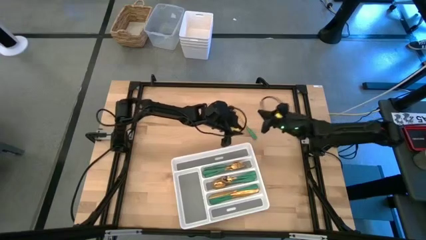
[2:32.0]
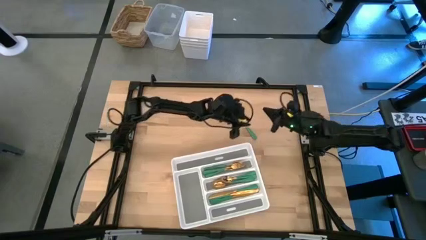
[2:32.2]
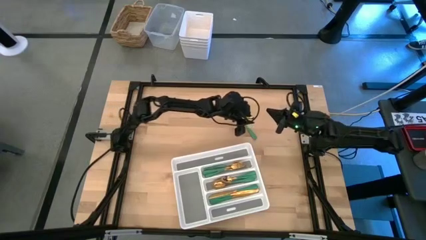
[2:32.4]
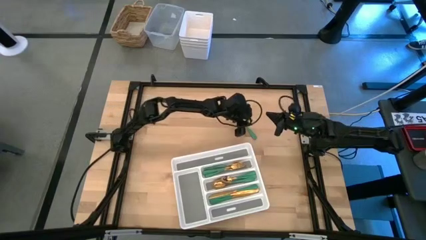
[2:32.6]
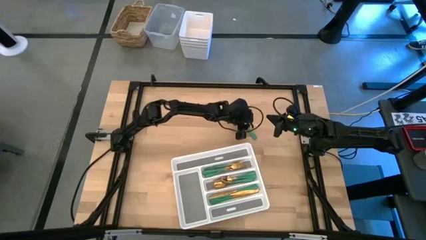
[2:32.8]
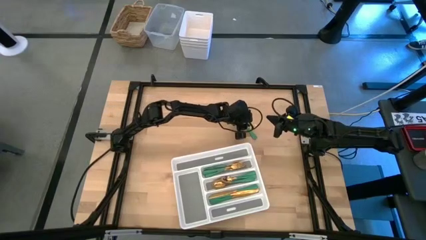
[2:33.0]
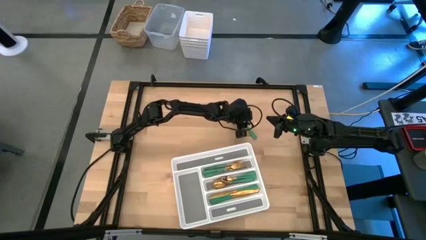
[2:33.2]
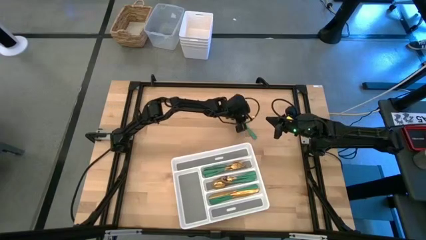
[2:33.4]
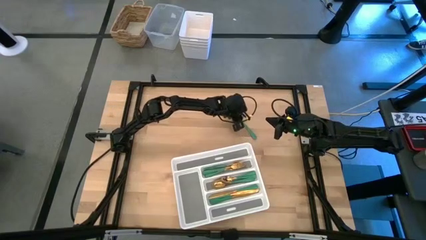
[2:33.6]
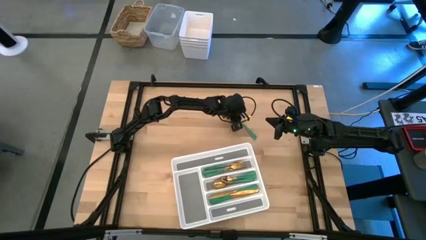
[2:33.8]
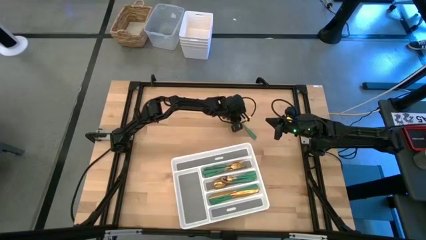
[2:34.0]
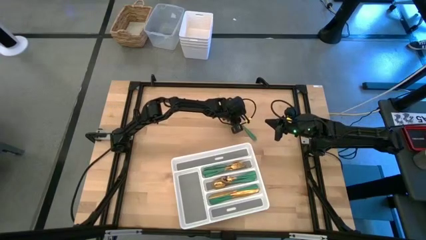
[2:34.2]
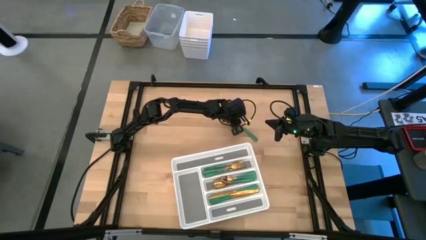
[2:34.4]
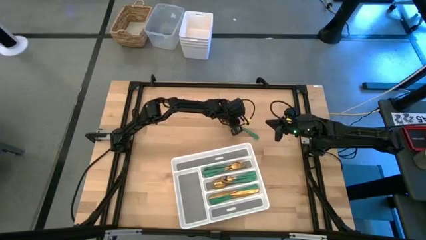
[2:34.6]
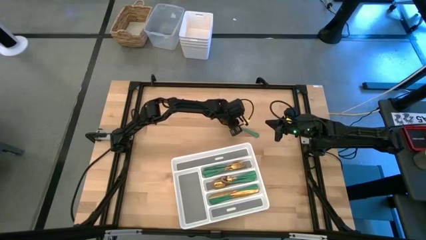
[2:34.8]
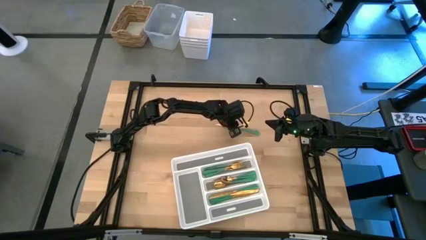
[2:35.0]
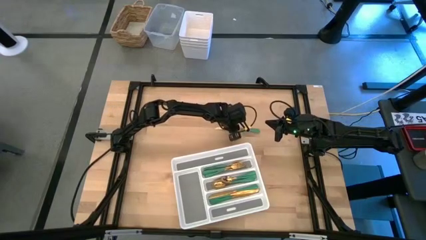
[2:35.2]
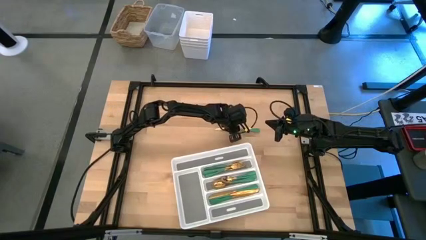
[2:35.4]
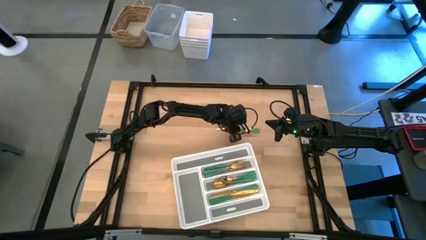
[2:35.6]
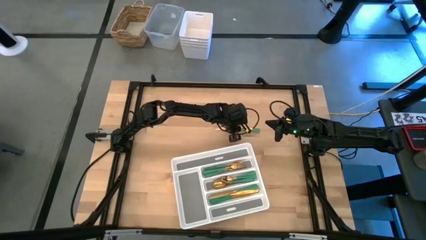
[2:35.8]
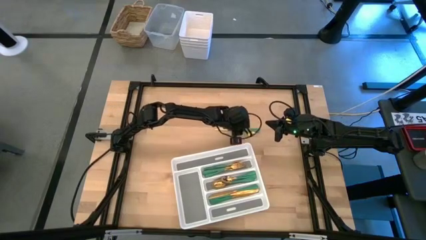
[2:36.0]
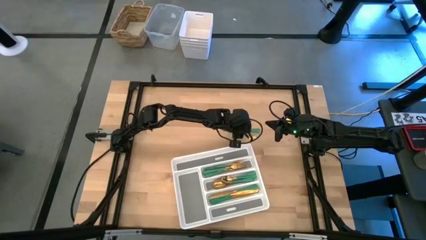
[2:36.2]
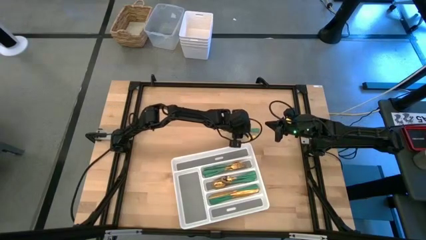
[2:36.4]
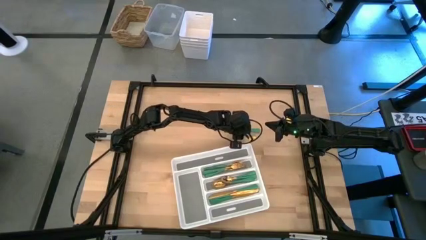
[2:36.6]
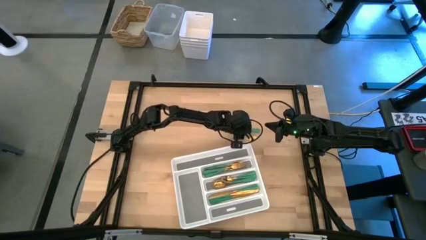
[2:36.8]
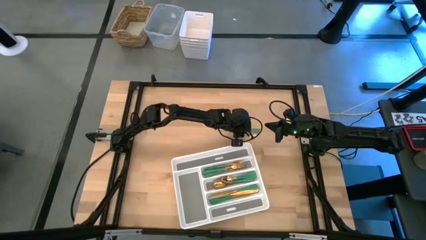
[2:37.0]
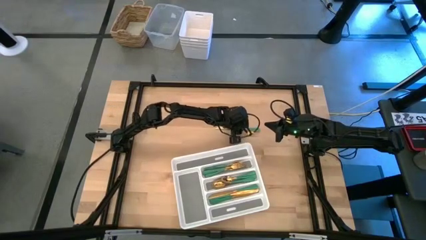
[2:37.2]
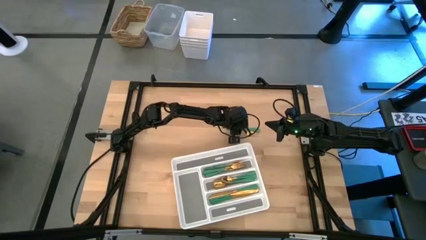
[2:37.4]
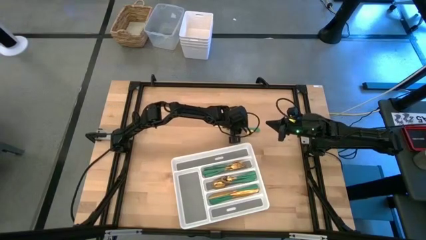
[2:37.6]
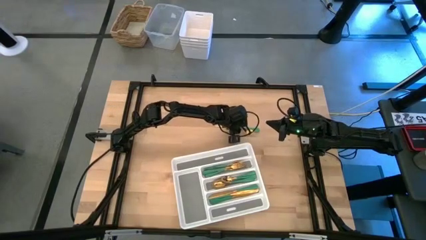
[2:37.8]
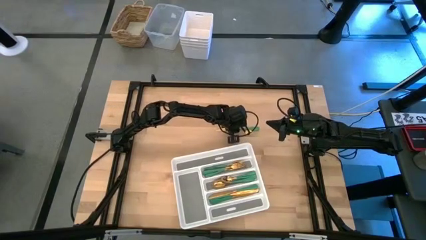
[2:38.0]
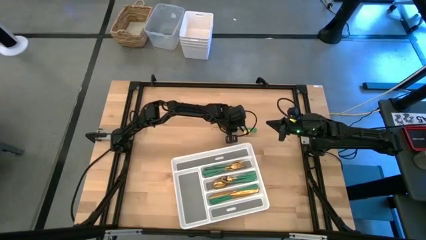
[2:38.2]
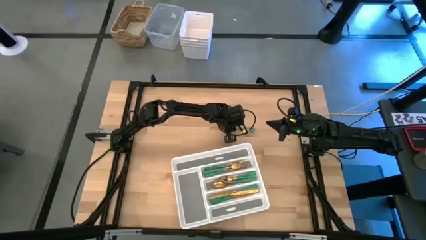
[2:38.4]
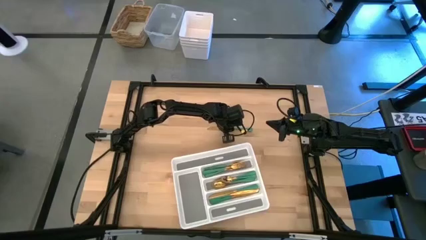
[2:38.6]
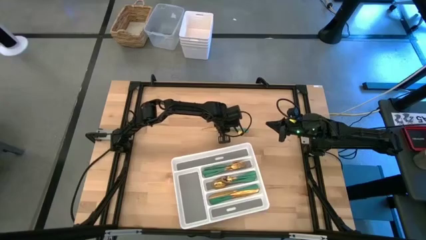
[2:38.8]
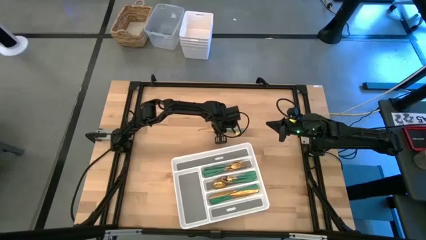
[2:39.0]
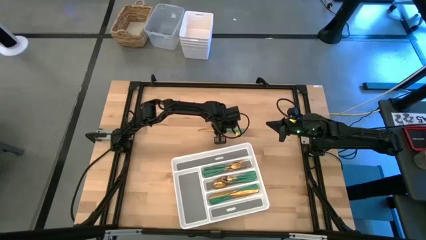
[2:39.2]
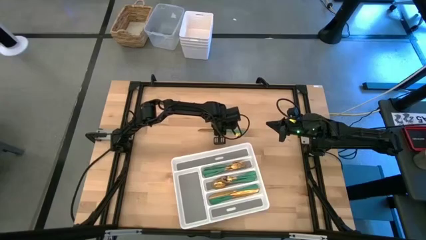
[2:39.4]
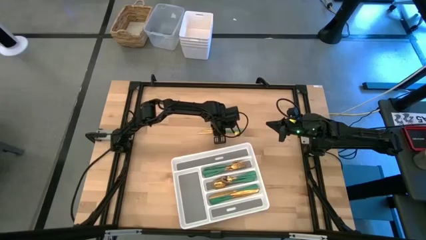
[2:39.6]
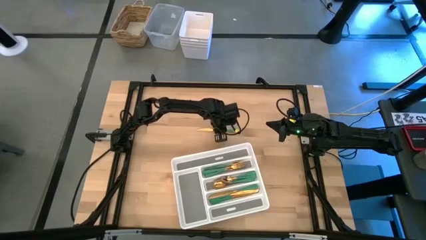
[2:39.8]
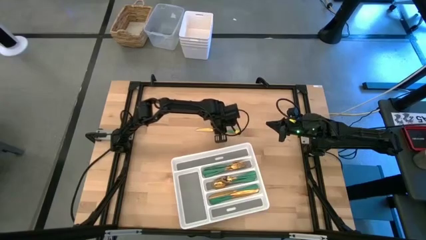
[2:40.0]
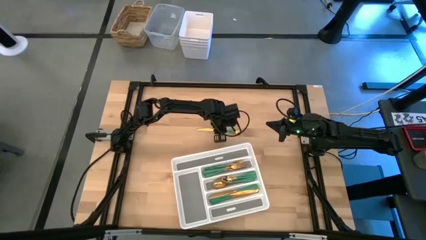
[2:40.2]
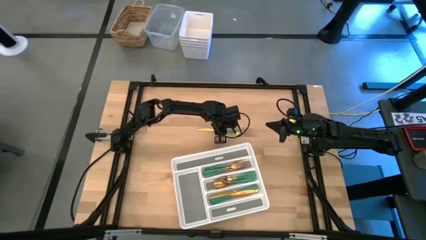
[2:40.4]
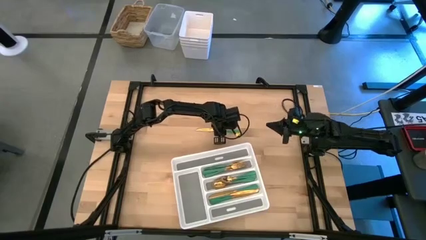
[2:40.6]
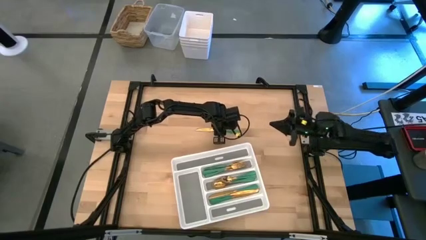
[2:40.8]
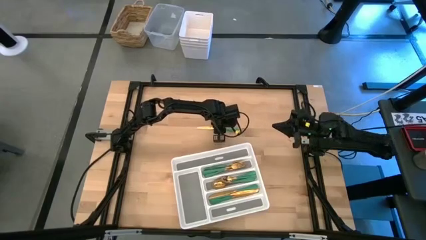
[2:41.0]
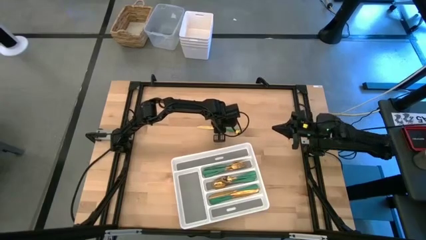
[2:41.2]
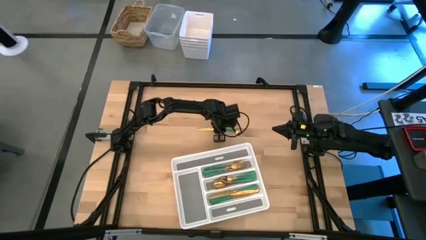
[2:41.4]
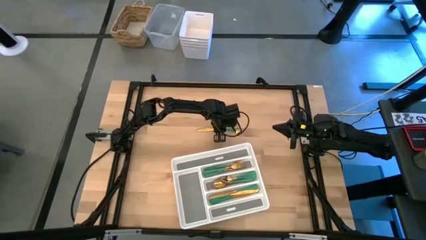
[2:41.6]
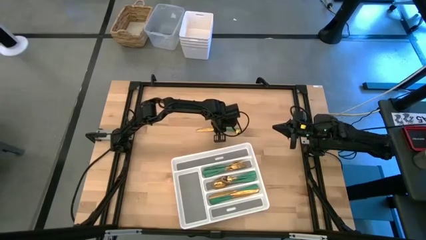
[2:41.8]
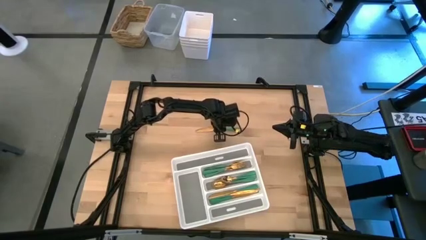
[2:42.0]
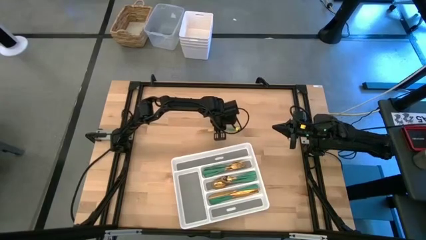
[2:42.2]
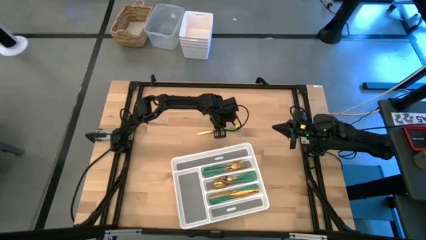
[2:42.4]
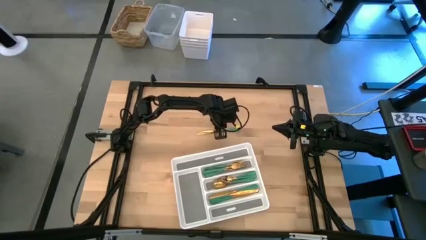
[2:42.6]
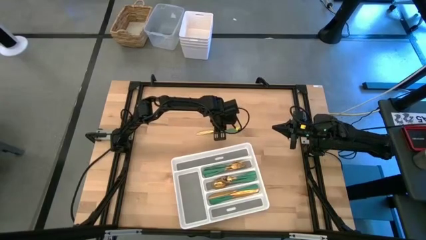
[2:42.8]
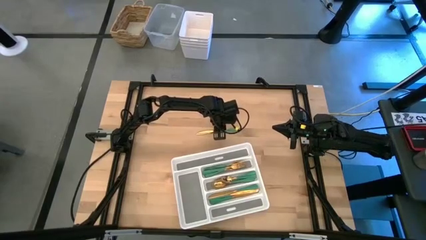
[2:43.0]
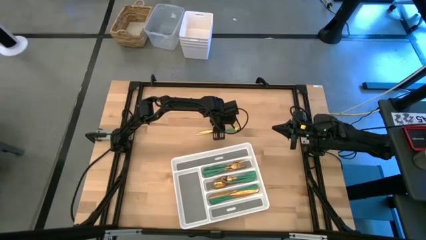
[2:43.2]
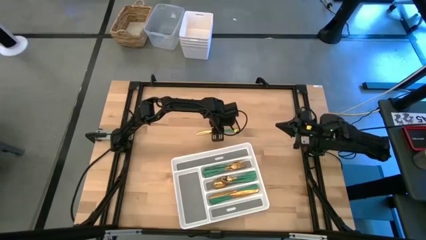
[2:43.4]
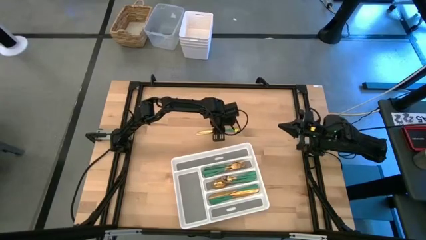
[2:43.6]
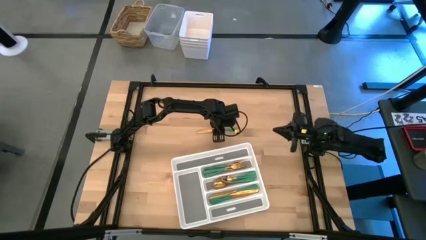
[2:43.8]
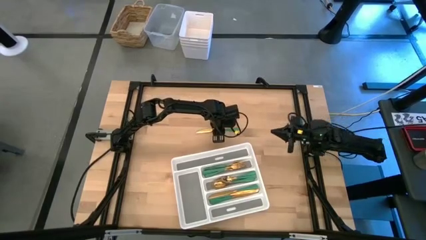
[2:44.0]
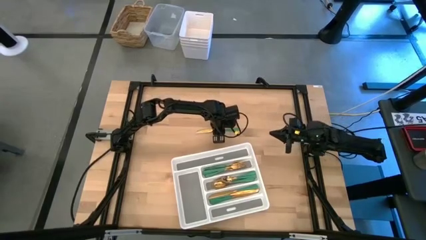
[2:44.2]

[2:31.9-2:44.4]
Task: Sort silverware
Put the green spoon into the white silverware tray

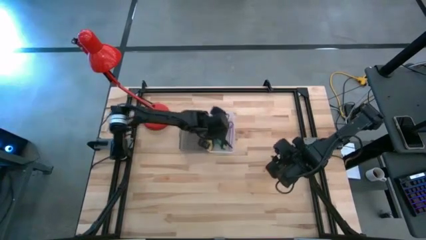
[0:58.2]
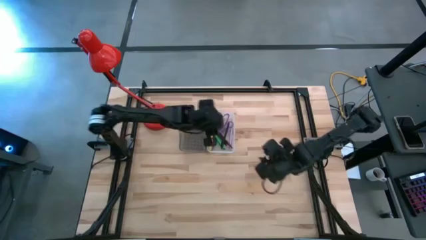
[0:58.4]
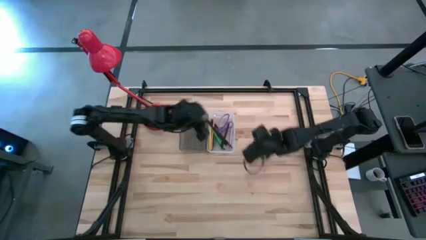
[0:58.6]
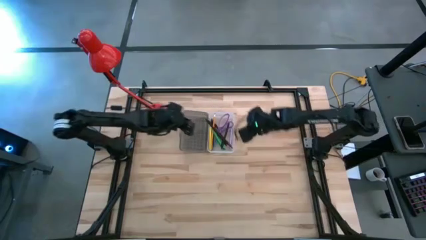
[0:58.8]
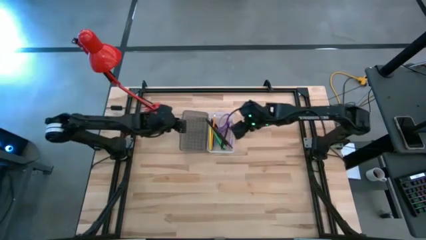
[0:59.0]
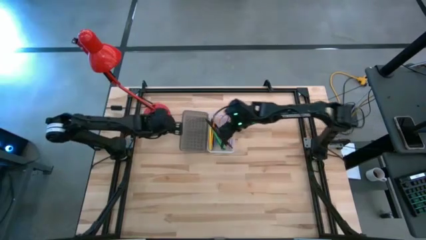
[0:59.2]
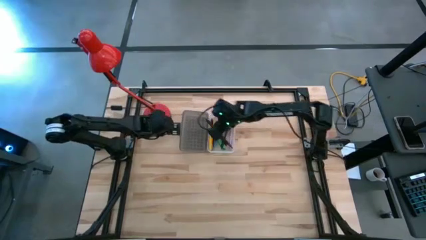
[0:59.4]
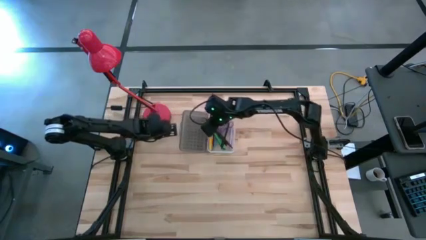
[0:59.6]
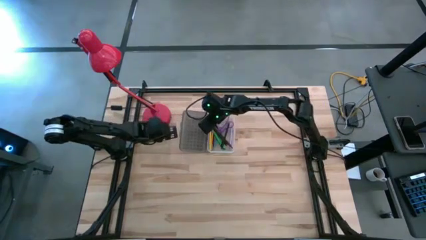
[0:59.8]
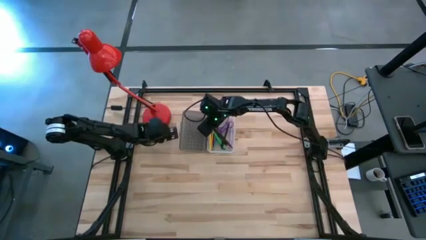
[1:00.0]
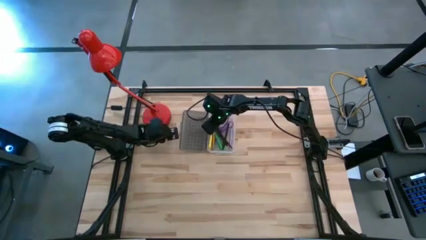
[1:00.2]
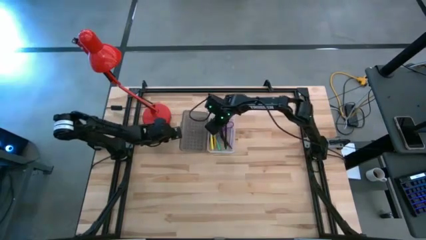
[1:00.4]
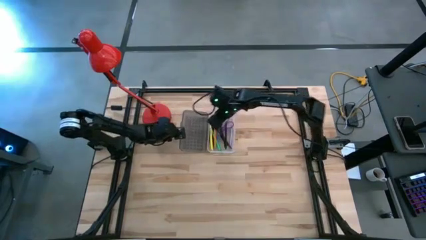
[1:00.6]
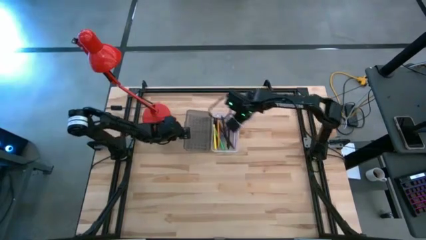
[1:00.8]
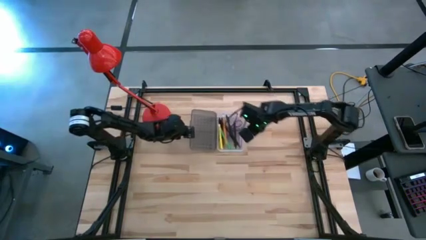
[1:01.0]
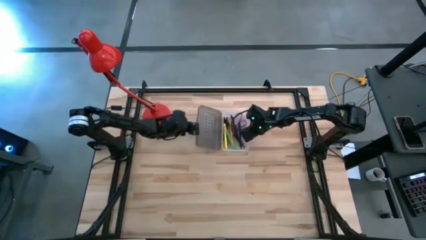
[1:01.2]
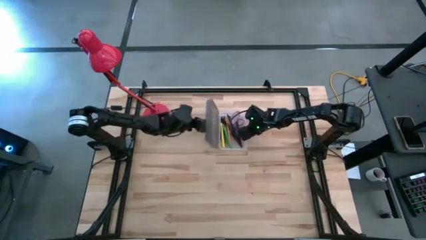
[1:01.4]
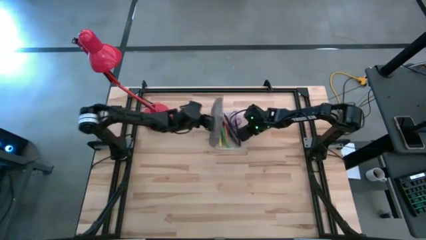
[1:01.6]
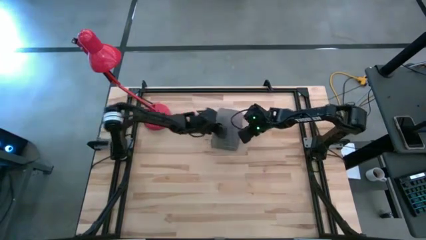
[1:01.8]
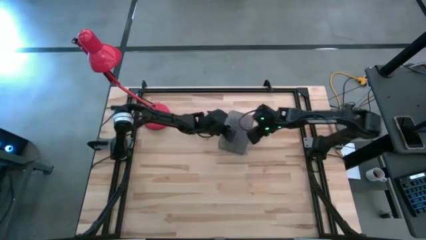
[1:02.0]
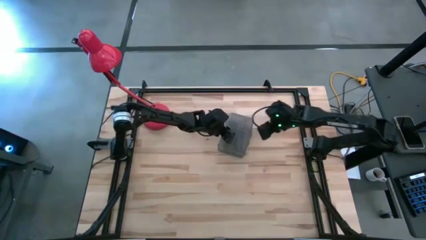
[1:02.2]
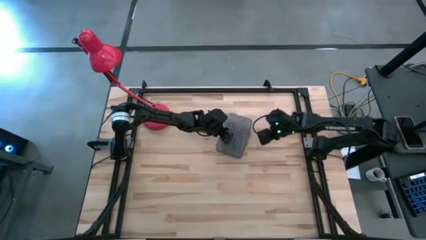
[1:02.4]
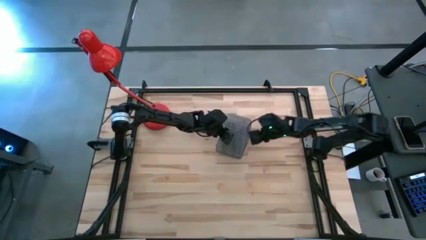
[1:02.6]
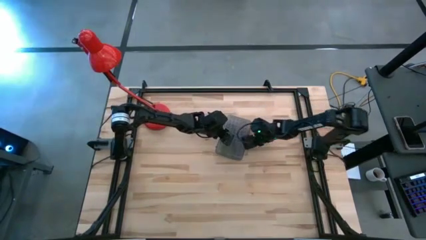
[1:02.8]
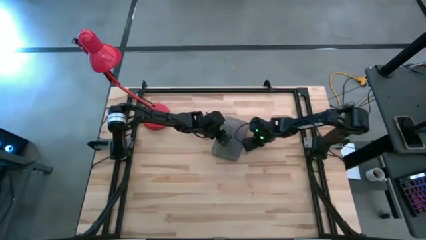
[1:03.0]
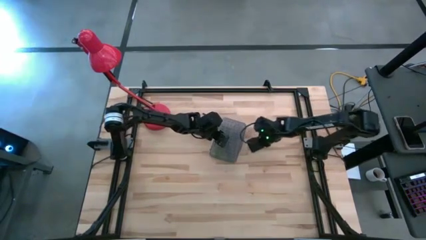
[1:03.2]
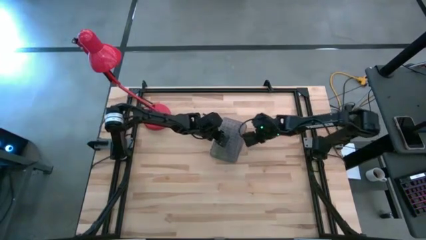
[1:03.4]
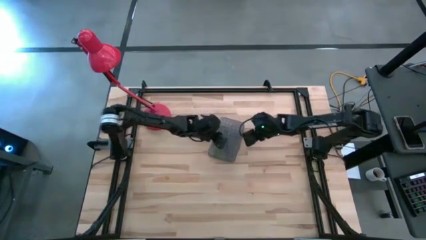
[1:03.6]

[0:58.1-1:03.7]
Task: Pick & place school supplies into a supply box
Close the supply box
